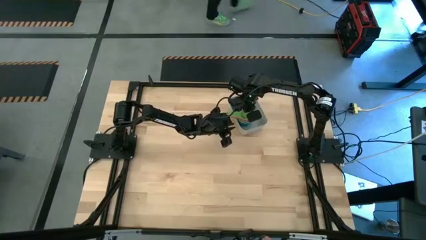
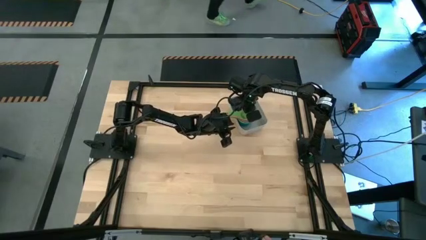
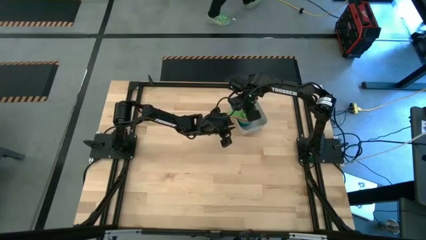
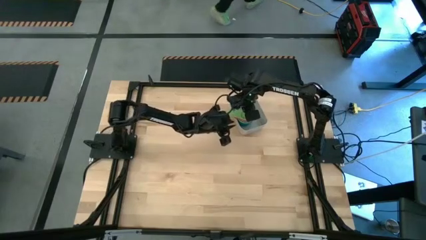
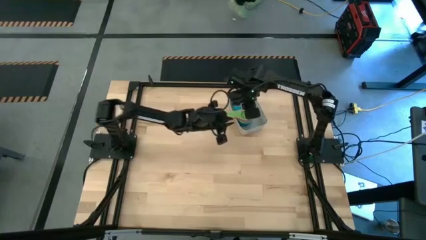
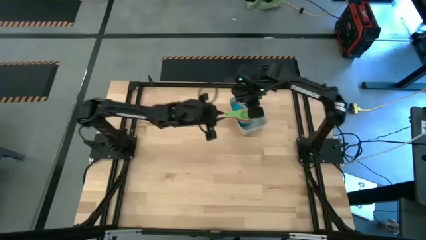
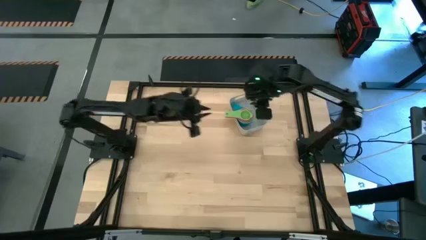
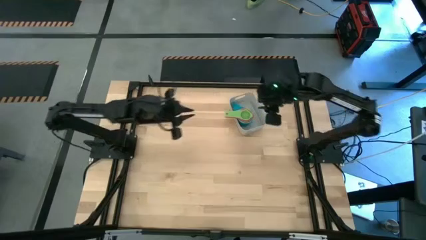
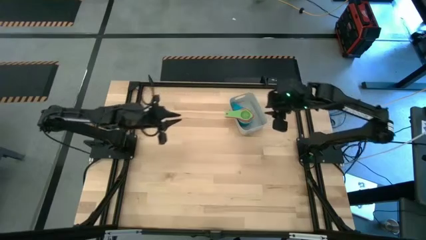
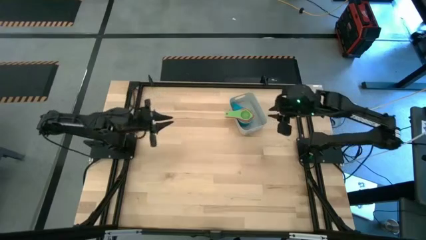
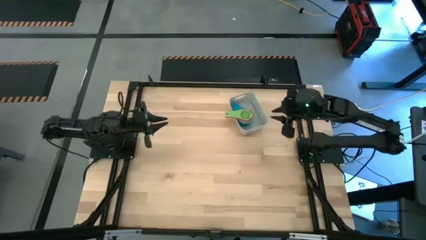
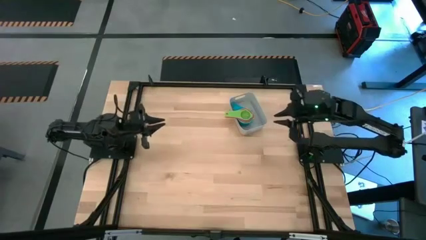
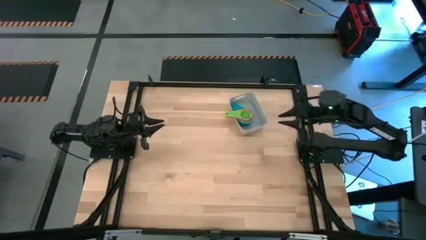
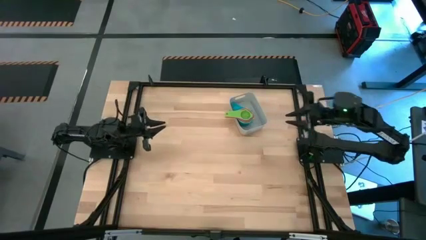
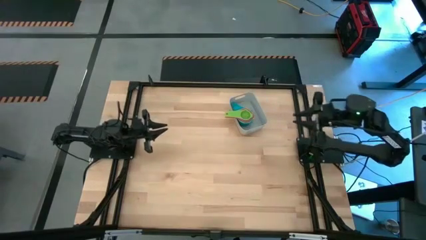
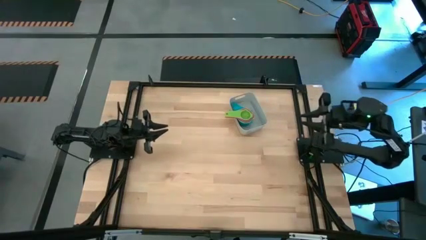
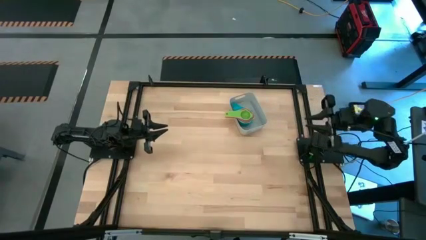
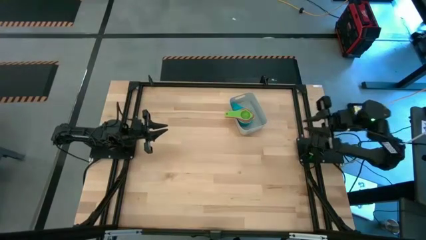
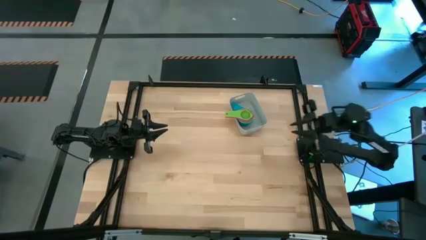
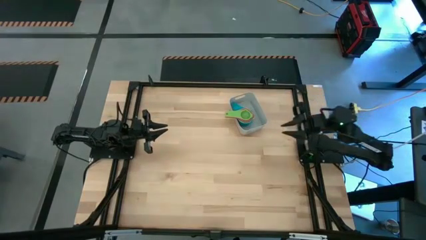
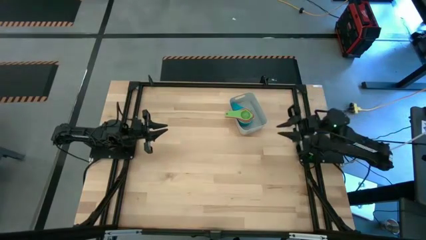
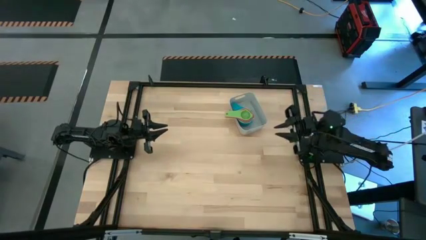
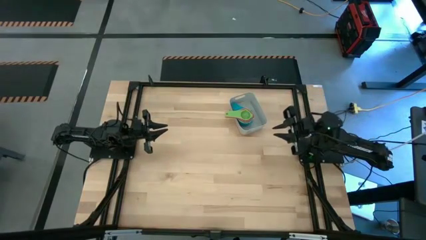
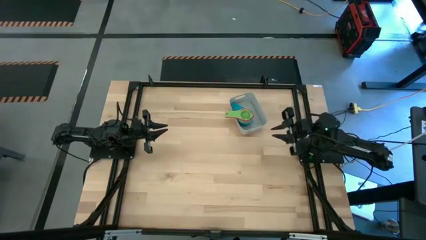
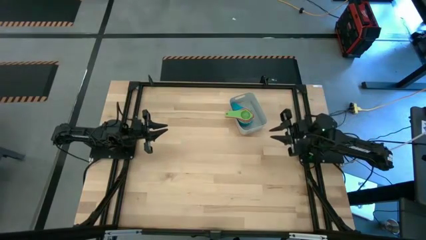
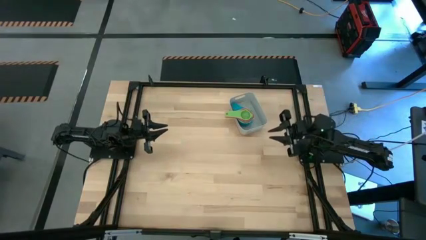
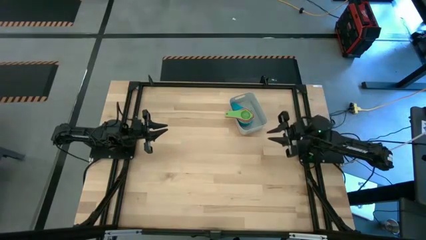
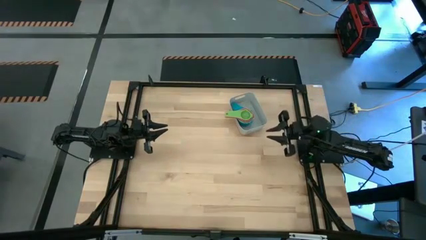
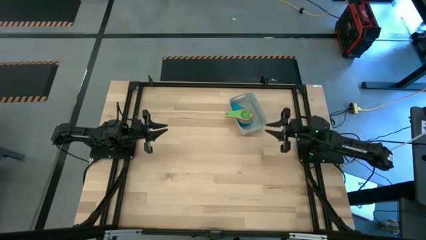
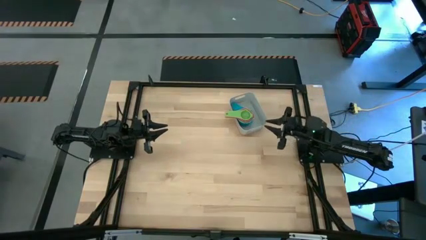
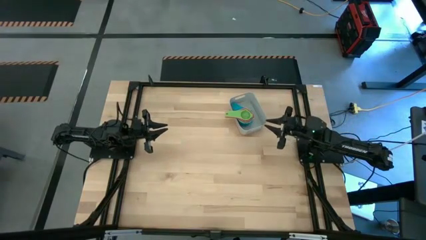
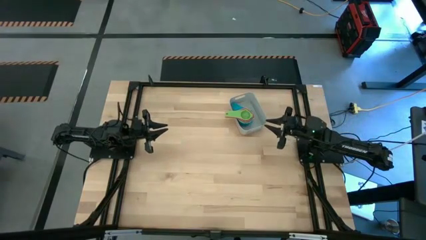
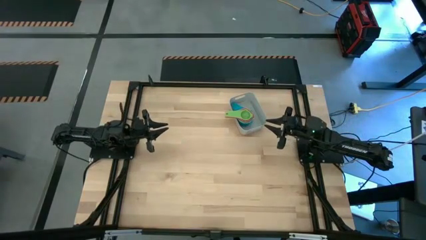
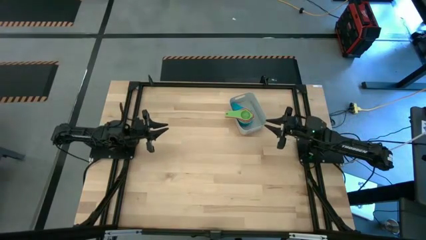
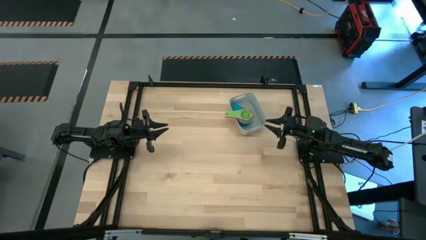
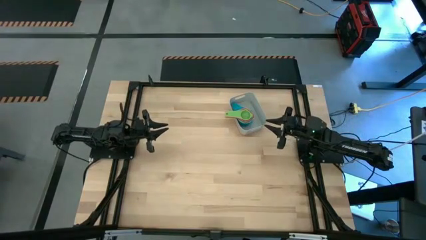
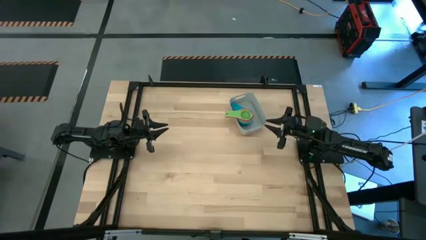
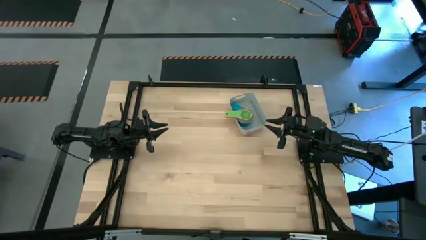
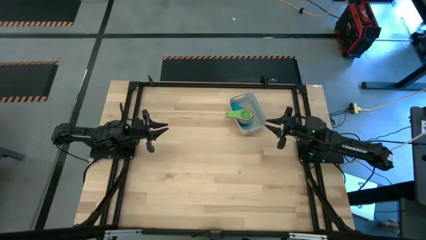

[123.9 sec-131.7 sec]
Task: Nest measuring cups in basket
Return to Home Position
